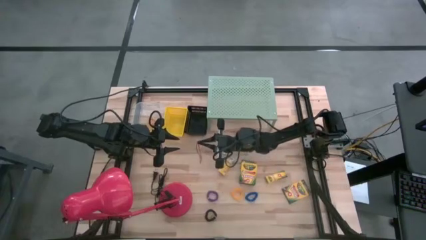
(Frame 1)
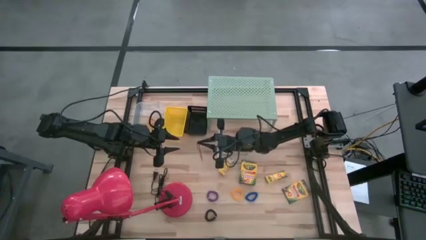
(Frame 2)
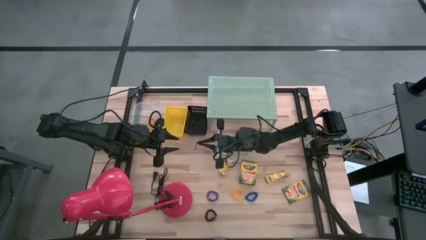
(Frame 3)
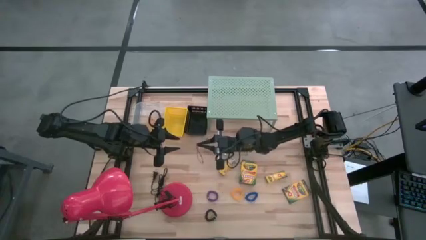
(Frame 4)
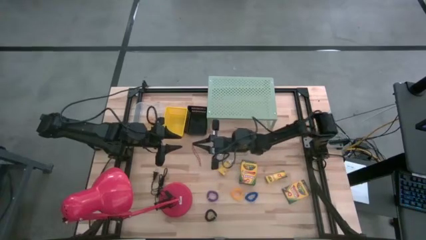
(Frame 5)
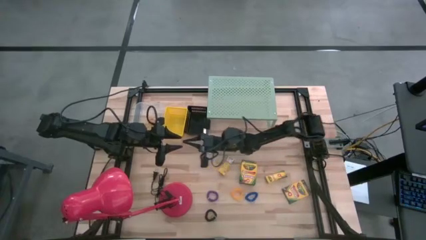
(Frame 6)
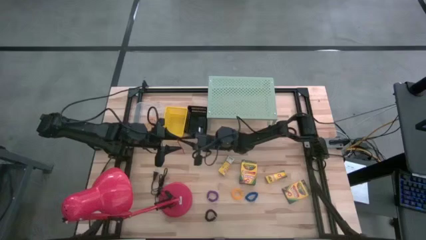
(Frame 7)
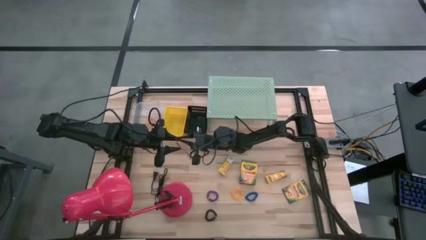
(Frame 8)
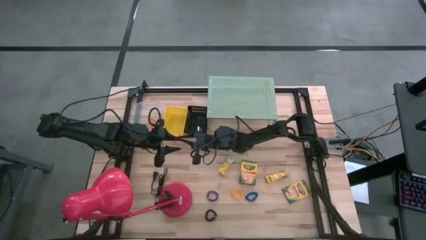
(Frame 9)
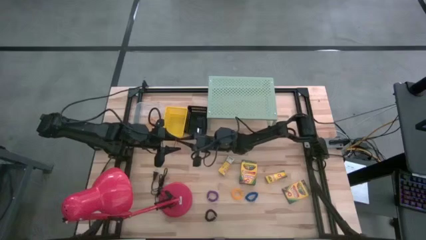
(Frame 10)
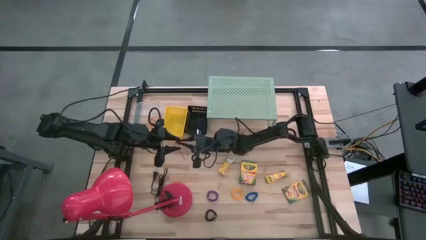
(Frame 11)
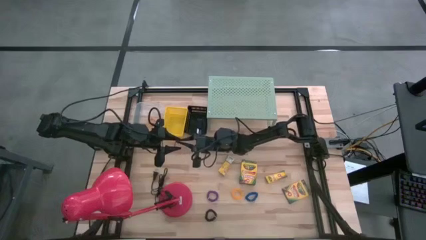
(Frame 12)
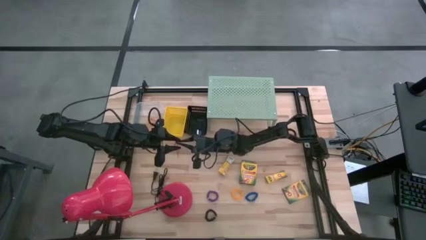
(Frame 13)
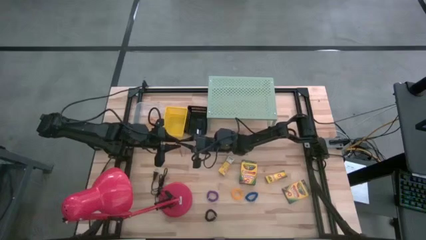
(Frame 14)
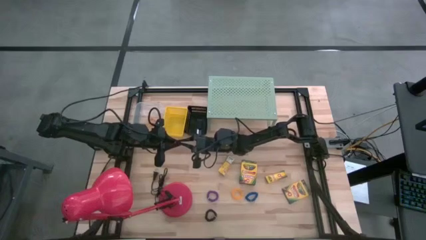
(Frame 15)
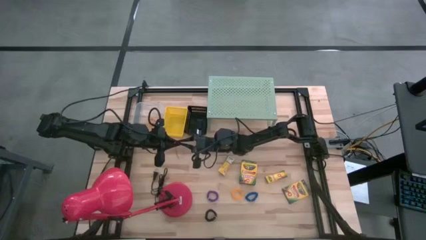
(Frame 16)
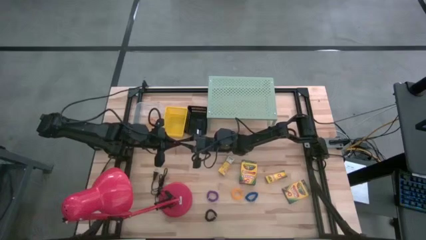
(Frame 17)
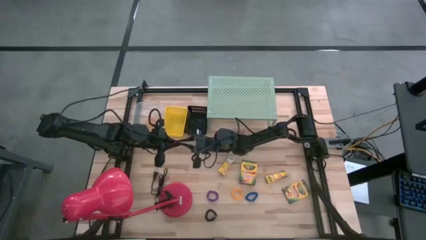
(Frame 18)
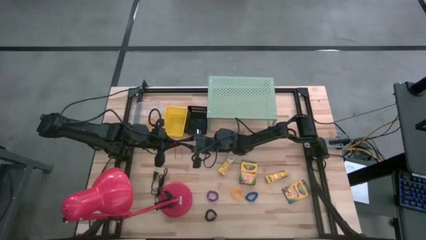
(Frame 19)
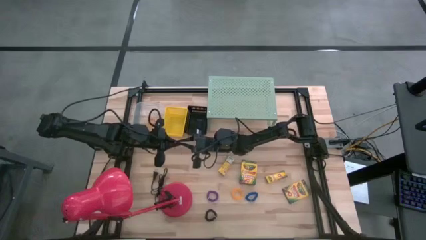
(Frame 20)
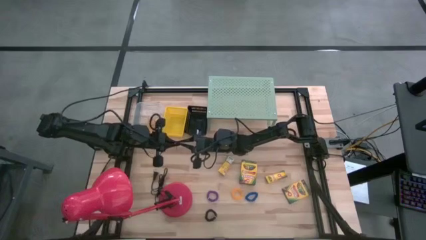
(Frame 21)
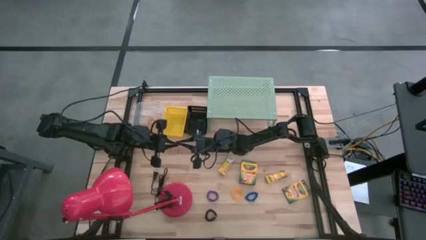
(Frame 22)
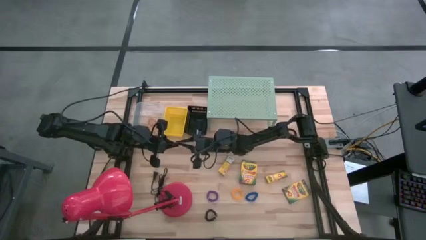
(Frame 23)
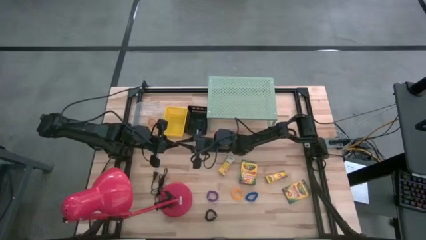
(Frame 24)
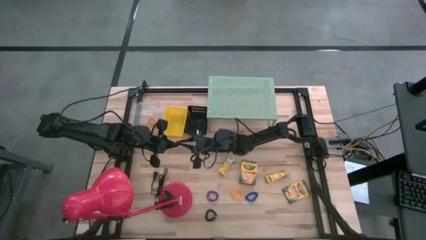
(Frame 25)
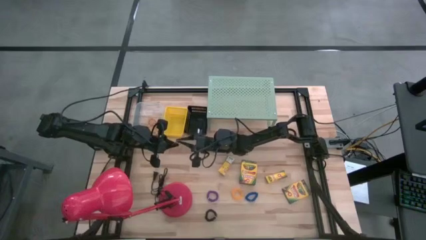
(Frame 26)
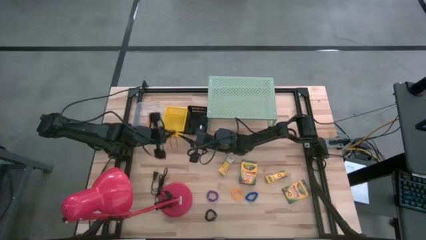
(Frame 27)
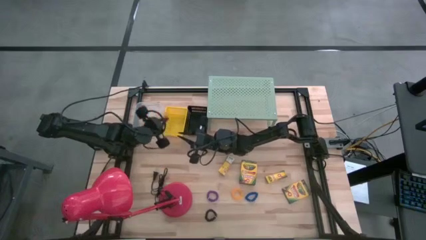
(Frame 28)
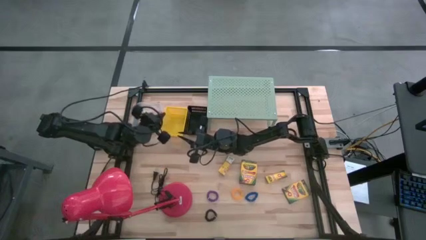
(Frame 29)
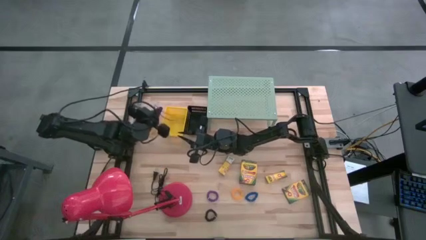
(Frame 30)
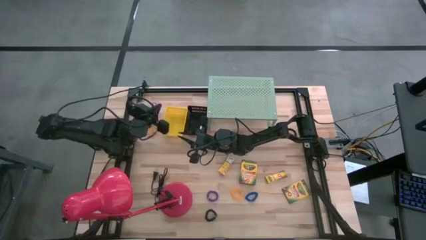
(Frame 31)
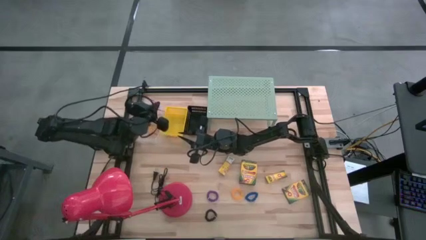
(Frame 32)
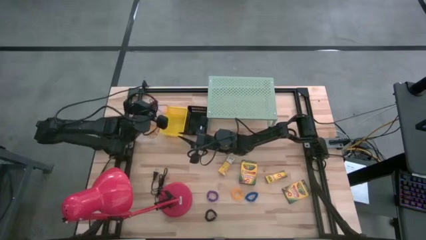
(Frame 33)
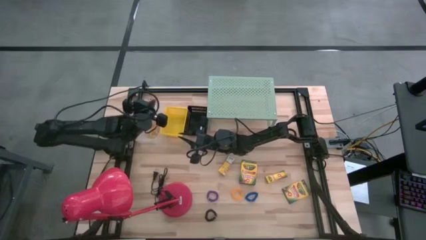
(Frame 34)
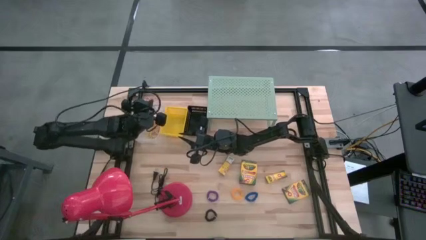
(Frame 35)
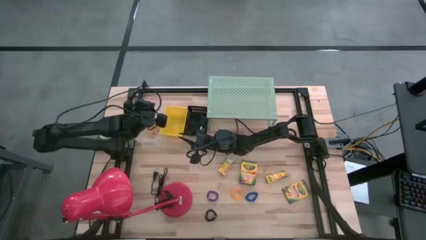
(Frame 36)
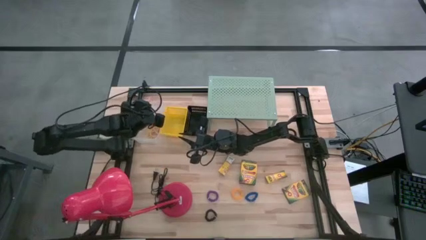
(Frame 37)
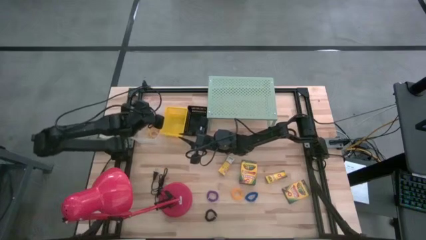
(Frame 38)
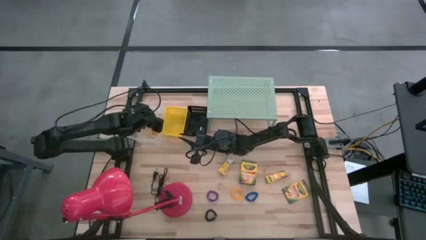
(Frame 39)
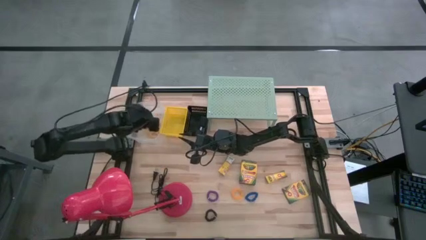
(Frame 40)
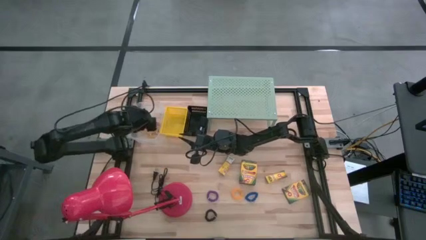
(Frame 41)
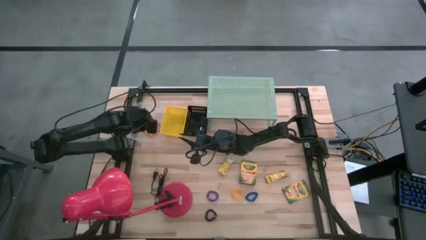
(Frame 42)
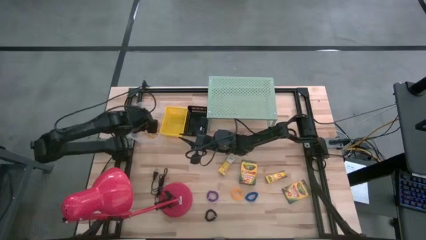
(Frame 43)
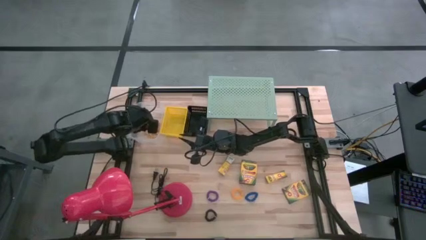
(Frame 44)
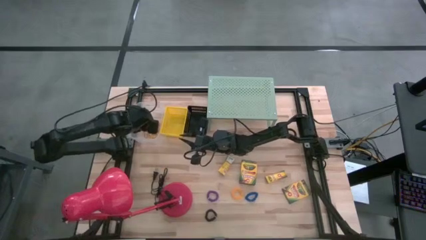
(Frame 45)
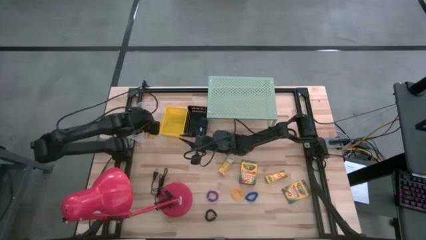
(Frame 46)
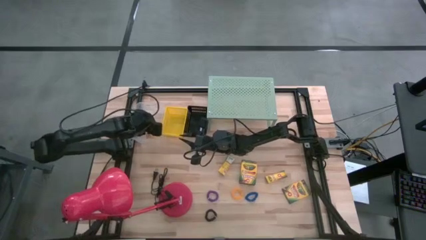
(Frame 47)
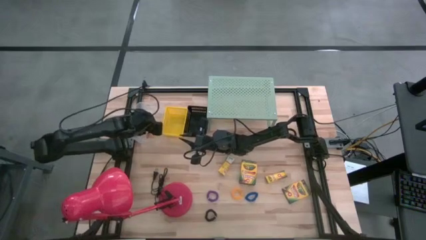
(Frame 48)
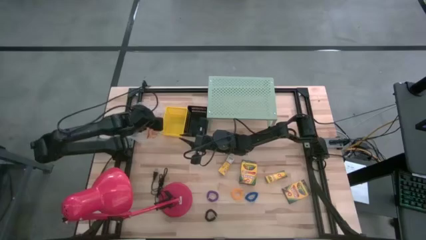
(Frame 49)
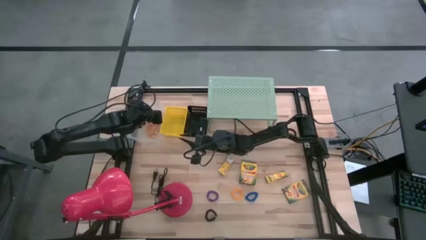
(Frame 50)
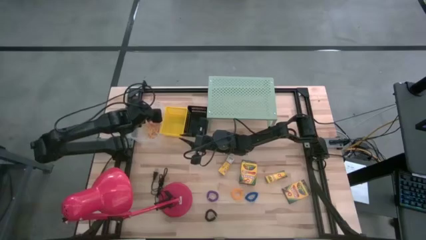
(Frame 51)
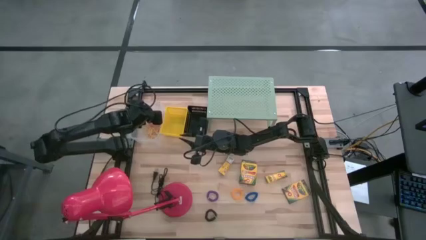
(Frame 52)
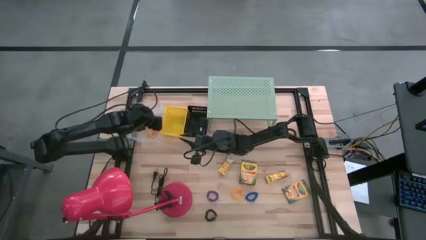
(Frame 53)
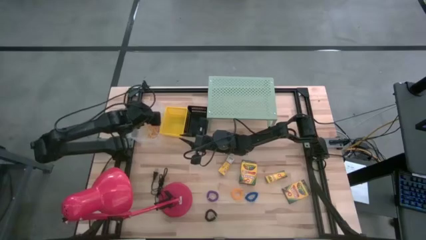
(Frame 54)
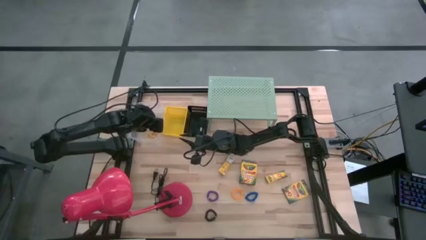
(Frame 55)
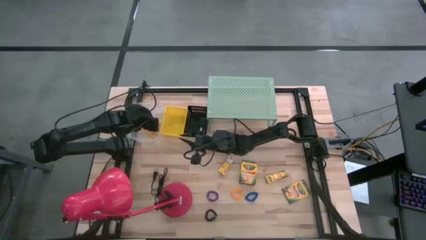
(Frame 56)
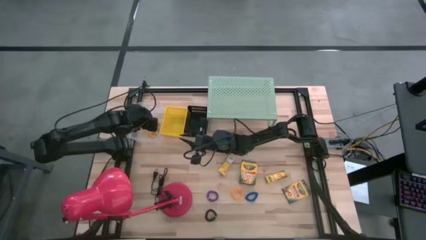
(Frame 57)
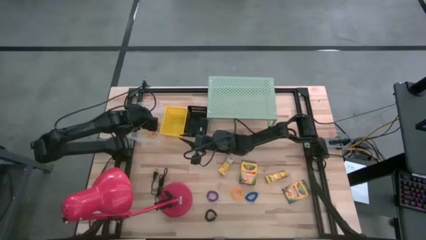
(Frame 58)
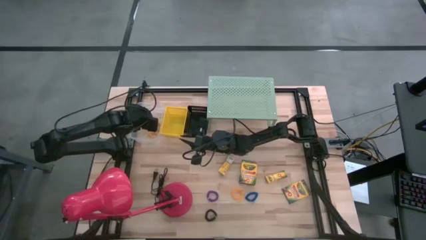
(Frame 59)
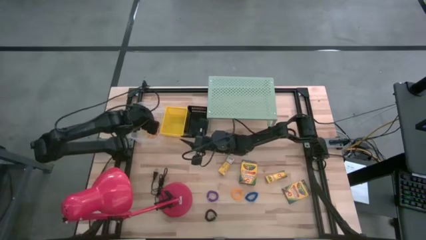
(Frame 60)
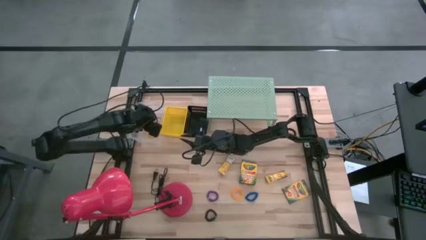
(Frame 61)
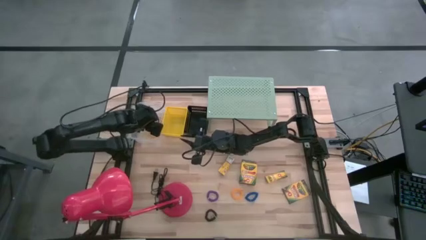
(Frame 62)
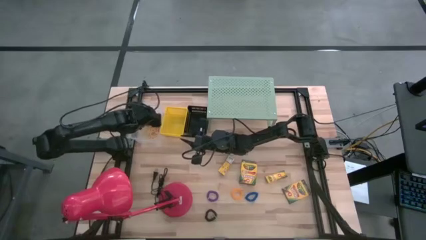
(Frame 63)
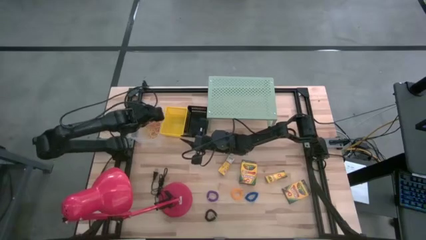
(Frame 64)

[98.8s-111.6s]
Task: Pick & Place Office Desk Supplies
Put the red rubber band into the transparent bin

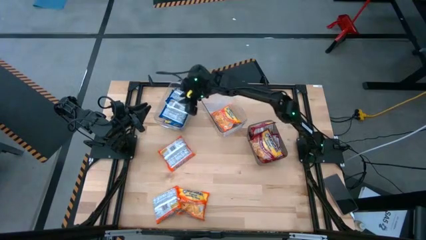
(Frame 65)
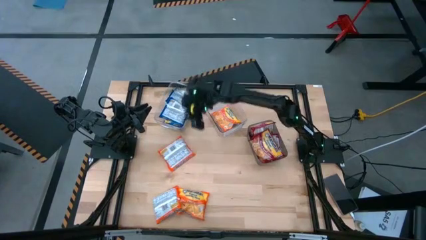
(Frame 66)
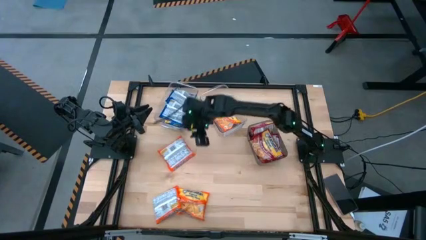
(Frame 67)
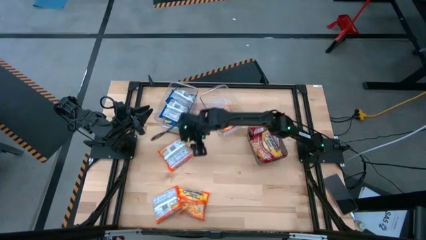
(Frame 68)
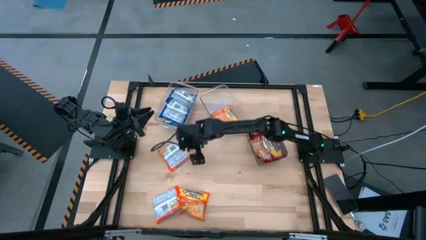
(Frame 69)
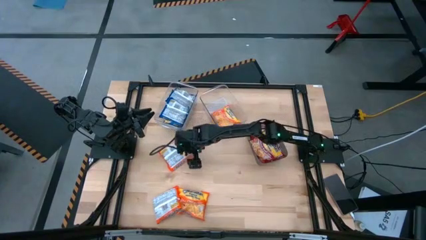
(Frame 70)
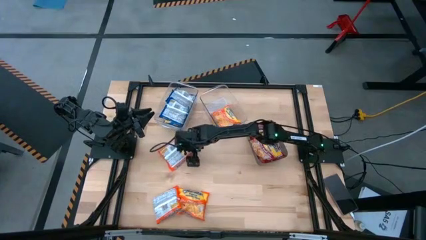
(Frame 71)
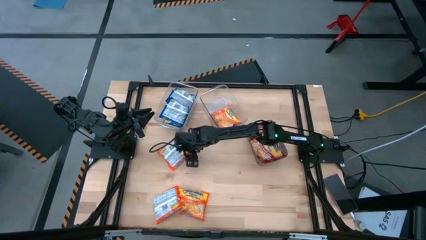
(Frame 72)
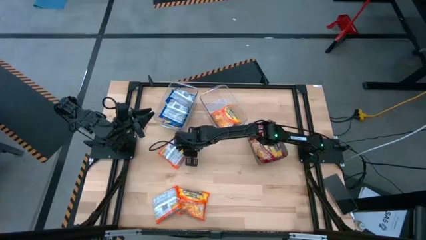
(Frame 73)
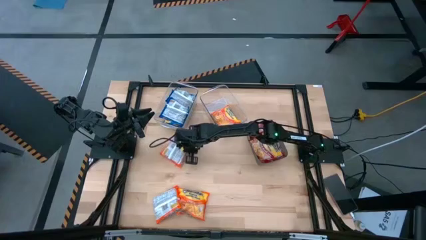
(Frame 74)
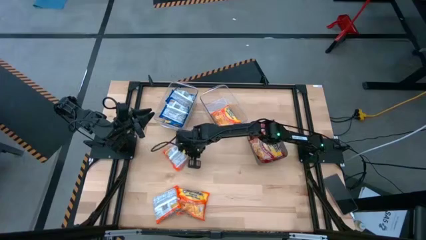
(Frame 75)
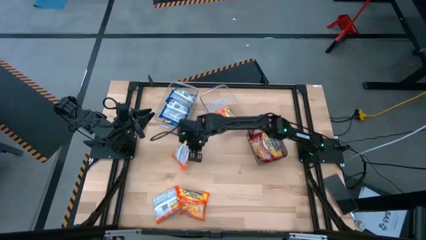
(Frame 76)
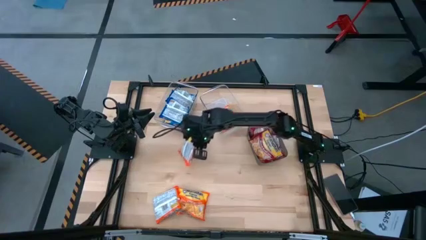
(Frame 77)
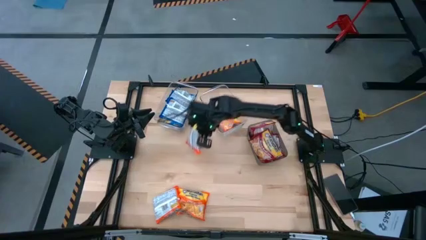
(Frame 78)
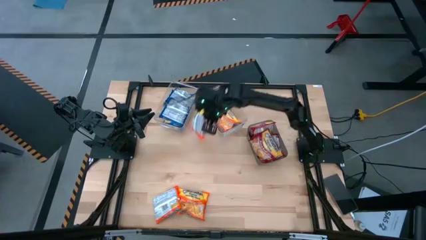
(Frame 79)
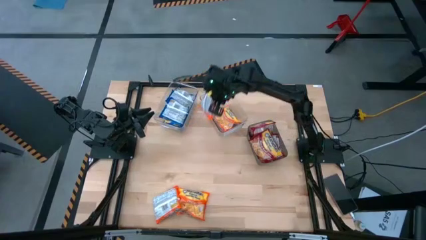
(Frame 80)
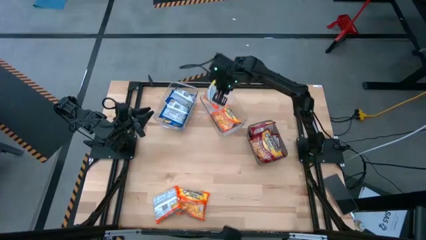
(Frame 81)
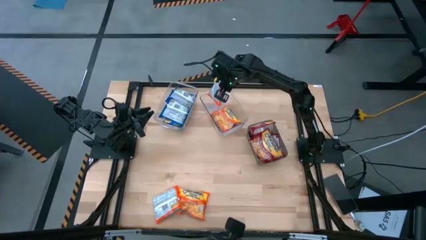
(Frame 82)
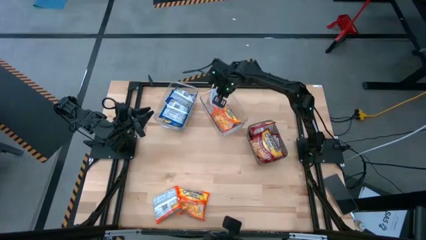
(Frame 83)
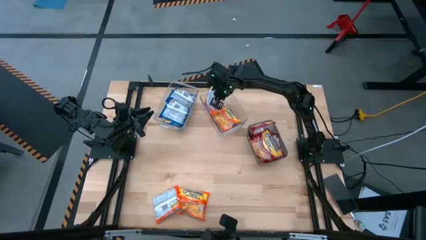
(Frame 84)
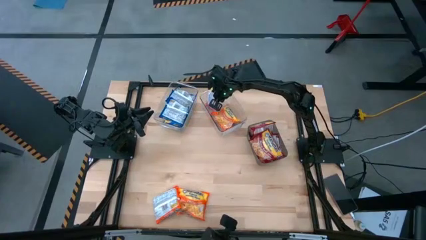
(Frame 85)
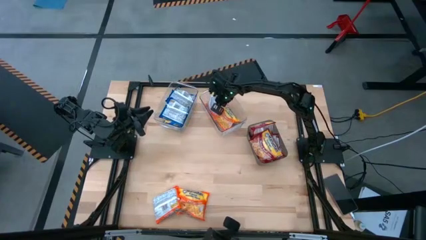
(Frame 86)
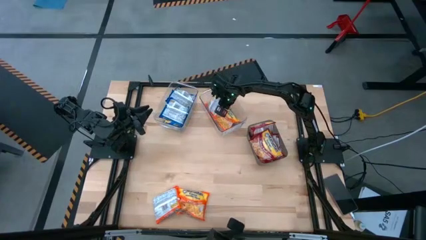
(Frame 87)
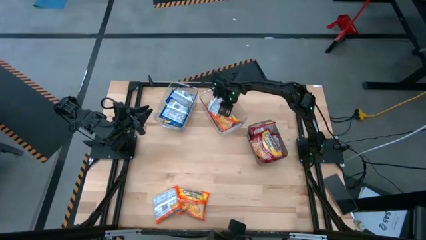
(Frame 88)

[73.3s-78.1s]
Task: Sort Maruchan noodles
Put the orange noodle pack into the right transparent bin
